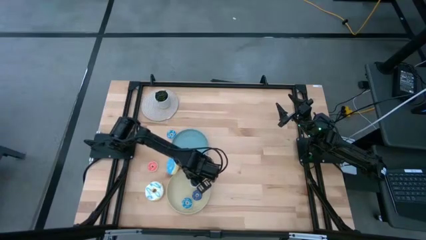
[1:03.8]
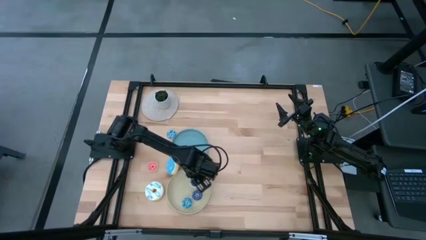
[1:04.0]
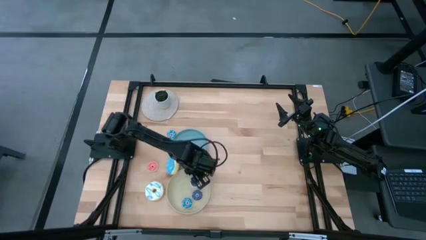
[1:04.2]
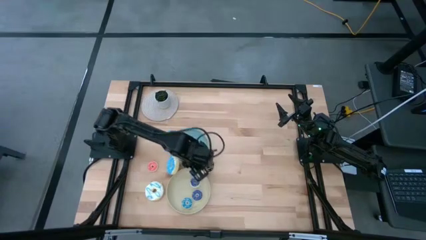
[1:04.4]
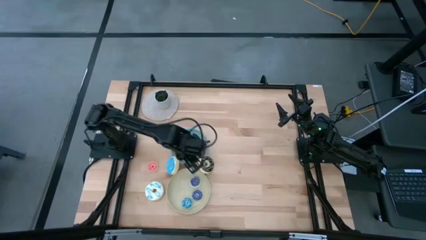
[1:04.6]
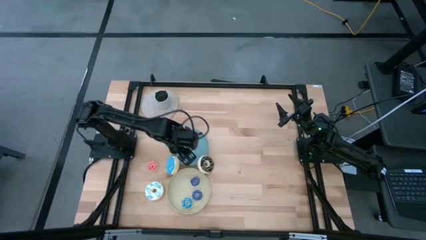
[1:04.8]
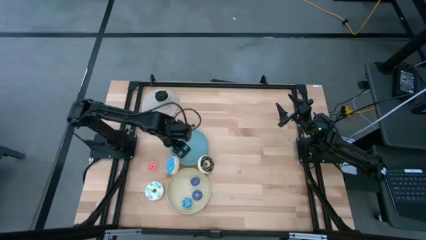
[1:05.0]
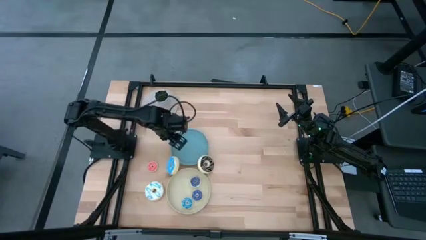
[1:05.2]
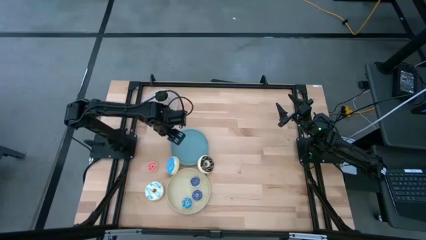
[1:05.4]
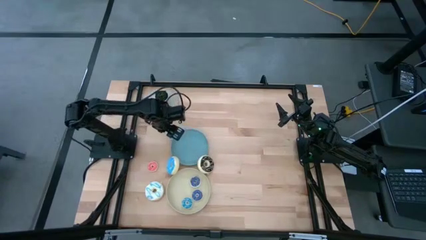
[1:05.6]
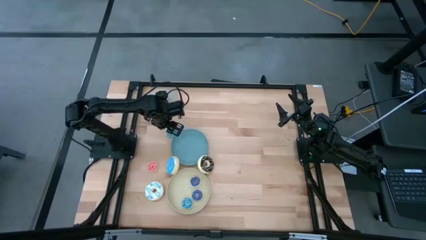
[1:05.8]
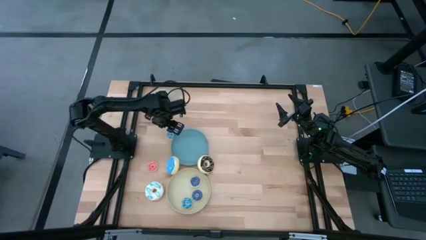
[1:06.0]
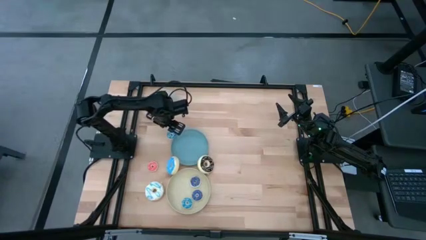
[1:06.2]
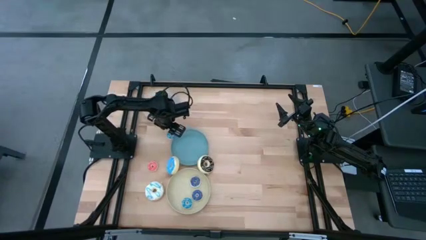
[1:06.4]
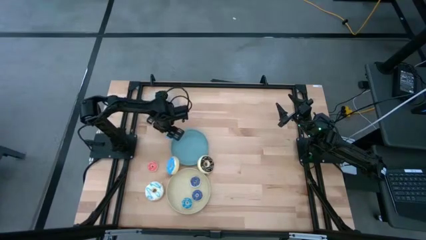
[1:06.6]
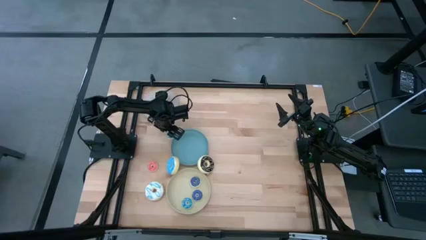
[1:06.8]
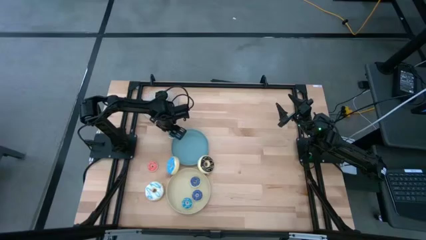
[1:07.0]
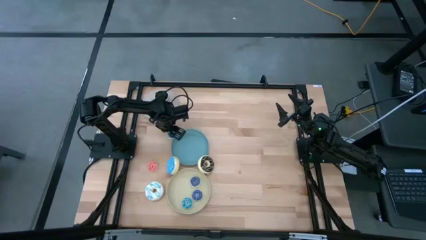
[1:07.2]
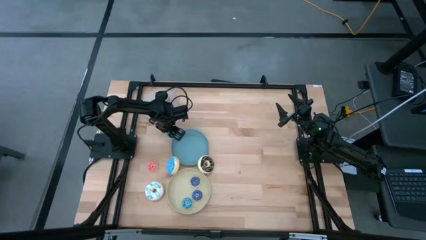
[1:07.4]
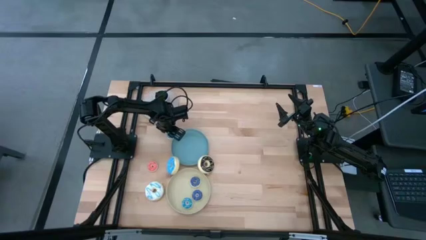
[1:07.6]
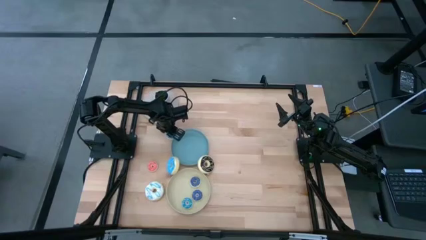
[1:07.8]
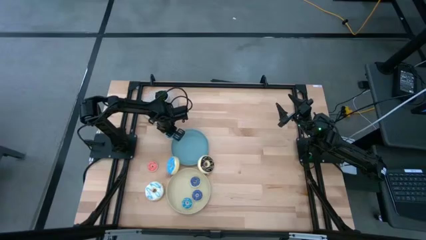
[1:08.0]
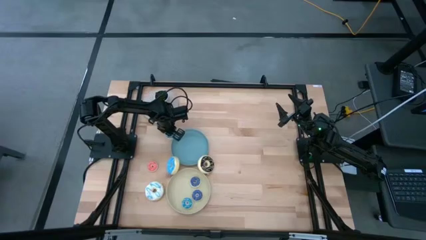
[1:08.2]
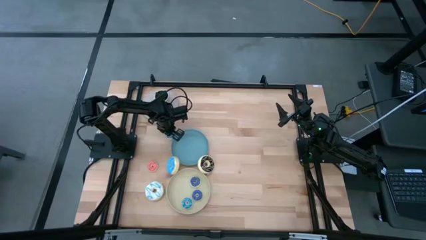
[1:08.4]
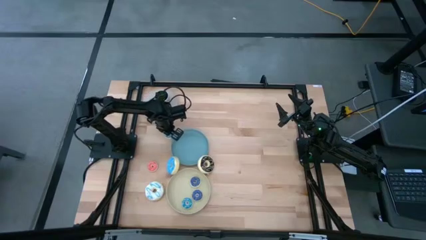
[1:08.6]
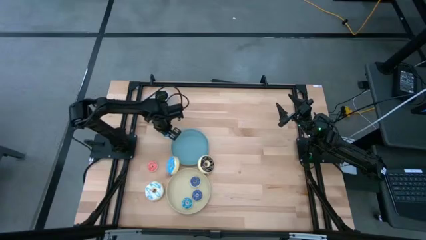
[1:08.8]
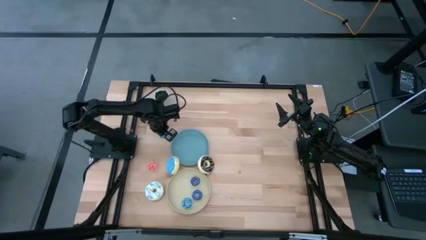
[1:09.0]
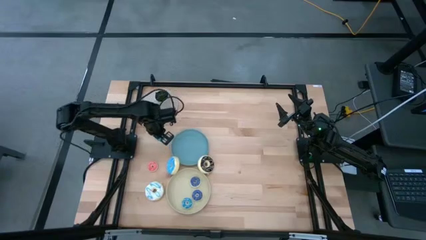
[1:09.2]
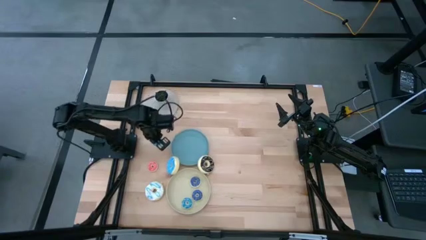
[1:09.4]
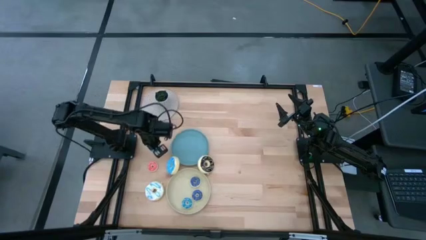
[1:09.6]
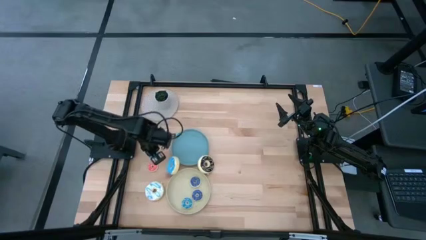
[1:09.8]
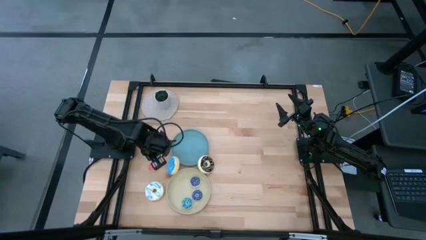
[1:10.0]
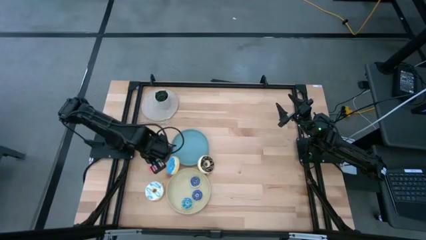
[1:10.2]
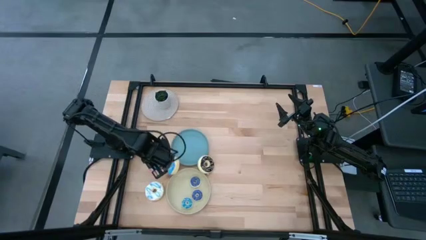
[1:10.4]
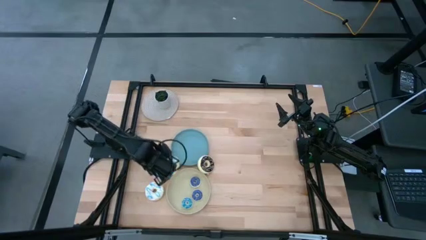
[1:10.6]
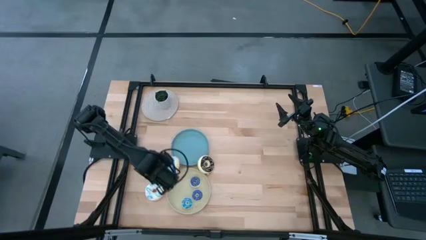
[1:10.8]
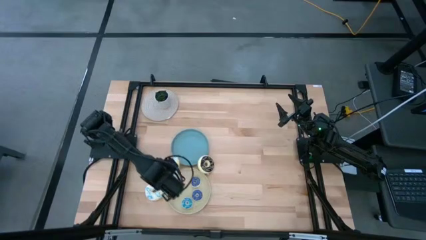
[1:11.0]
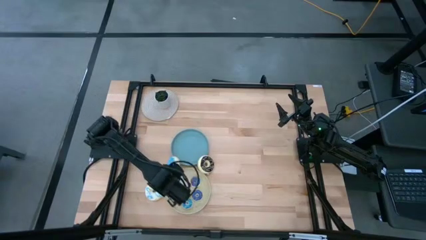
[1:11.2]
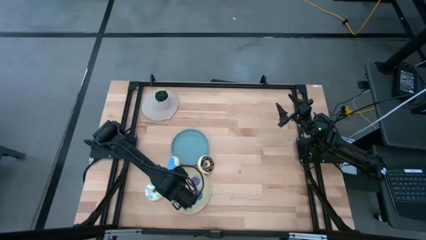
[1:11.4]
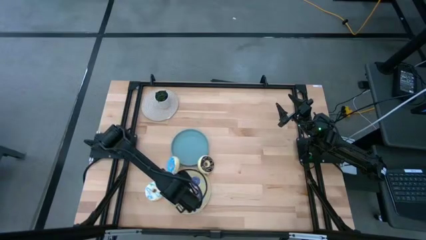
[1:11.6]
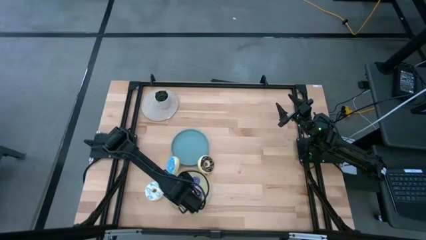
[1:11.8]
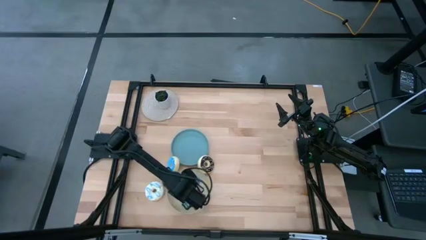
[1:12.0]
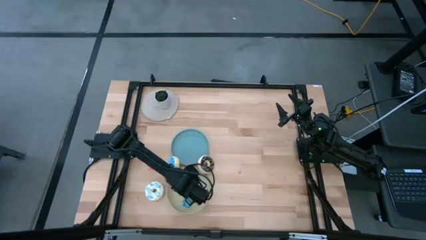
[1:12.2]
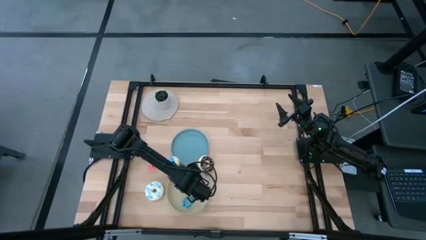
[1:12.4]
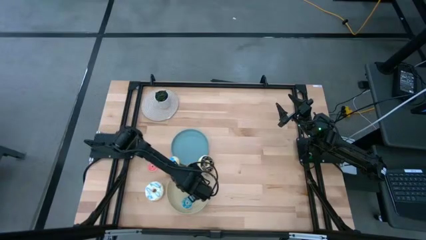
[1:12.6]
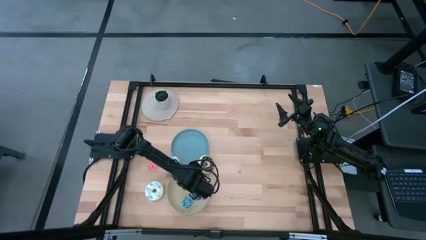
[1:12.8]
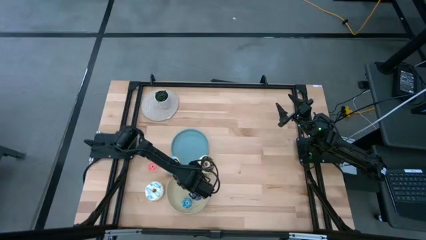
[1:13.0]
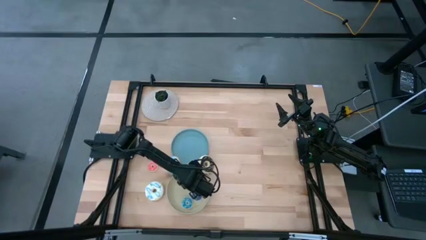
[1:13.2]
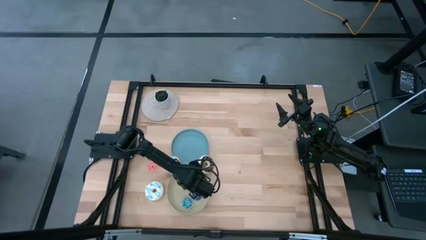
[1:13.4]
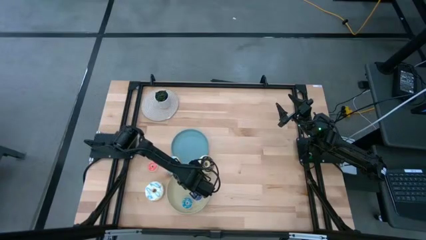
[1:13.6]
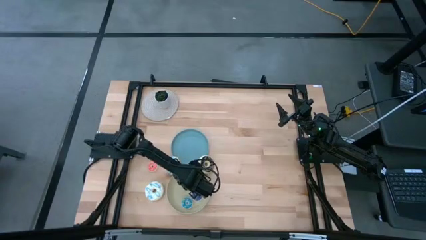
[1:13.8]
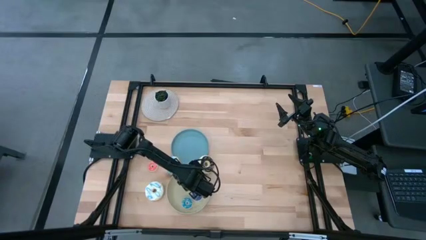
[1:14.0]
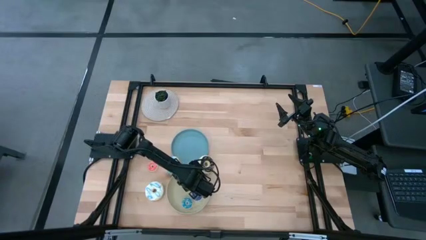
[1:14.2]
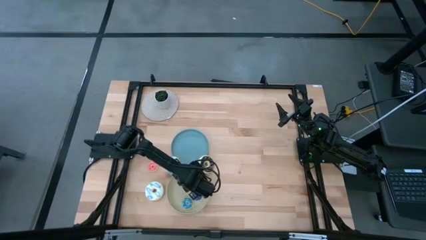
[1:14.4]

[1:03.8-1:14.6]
Task: Pick & Place donuts
Put the small light blue donut on the gray plate
